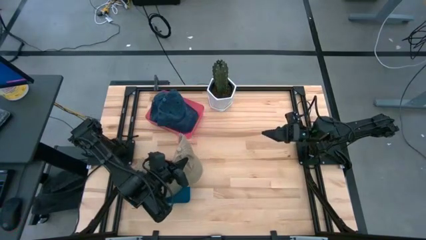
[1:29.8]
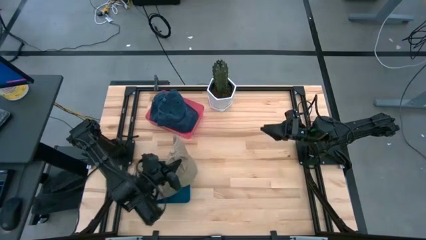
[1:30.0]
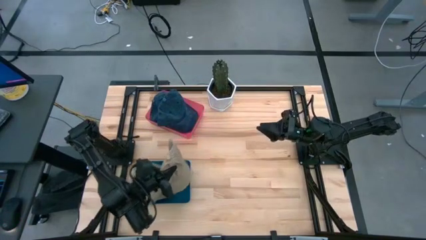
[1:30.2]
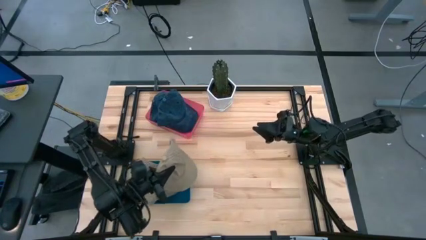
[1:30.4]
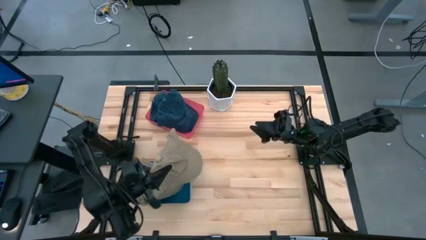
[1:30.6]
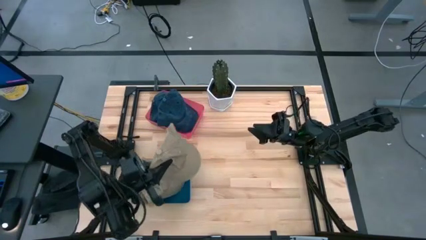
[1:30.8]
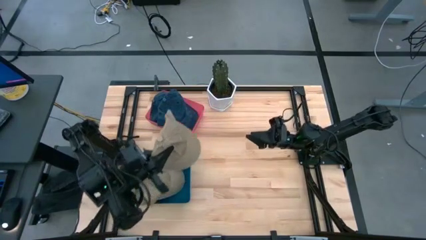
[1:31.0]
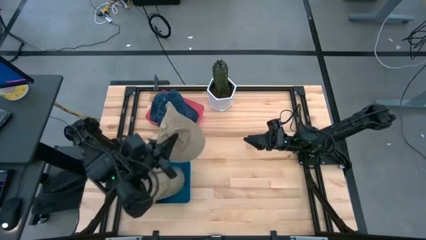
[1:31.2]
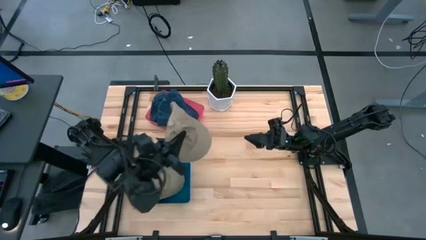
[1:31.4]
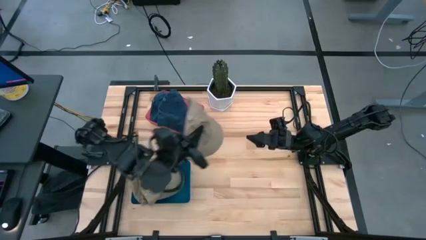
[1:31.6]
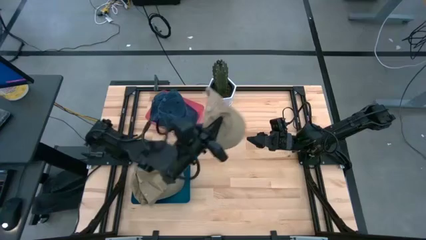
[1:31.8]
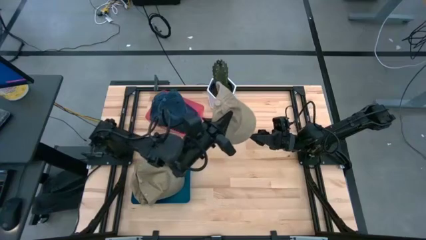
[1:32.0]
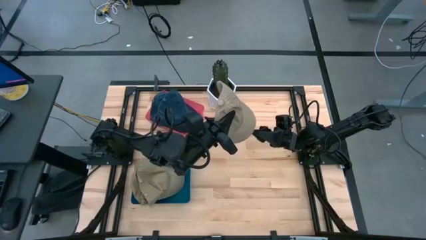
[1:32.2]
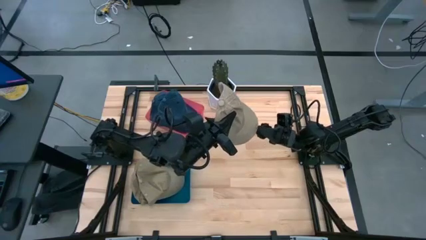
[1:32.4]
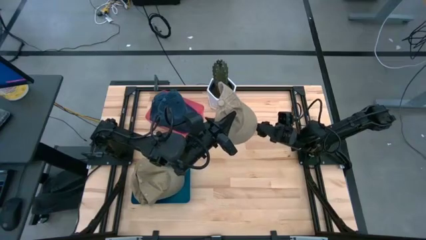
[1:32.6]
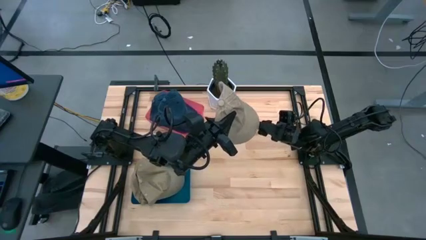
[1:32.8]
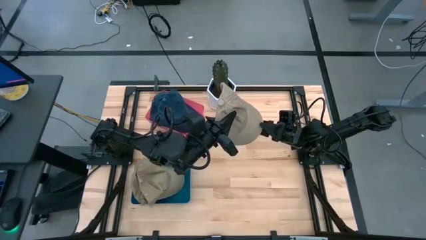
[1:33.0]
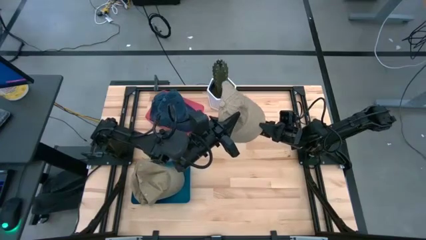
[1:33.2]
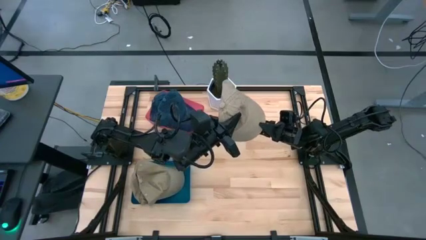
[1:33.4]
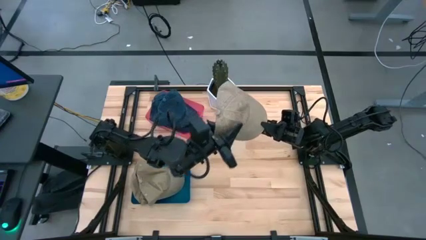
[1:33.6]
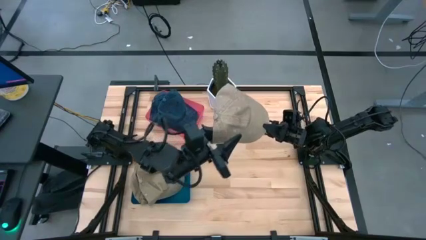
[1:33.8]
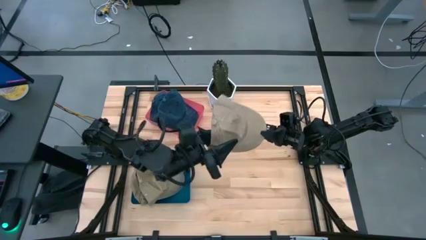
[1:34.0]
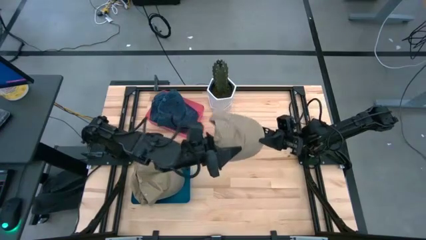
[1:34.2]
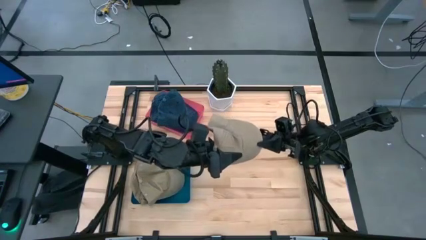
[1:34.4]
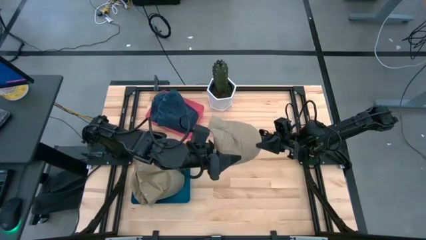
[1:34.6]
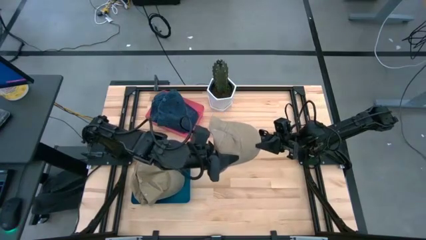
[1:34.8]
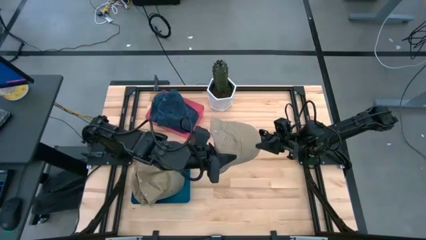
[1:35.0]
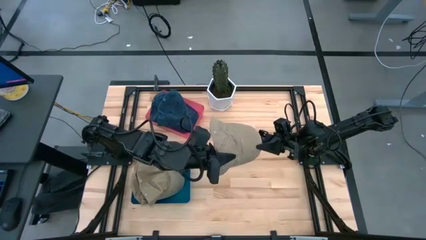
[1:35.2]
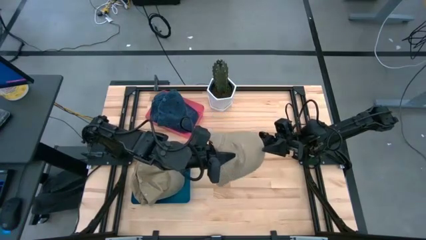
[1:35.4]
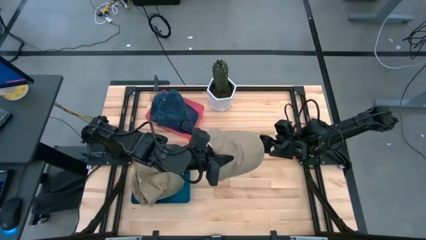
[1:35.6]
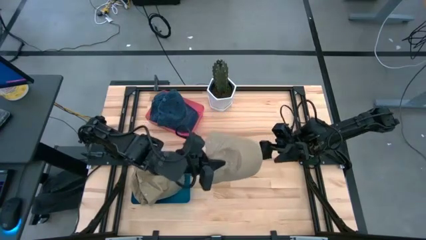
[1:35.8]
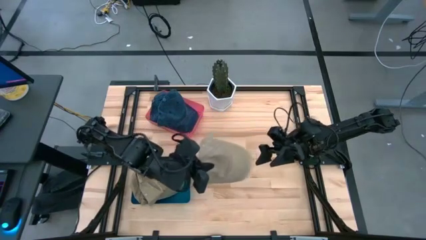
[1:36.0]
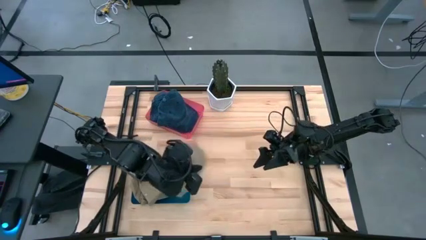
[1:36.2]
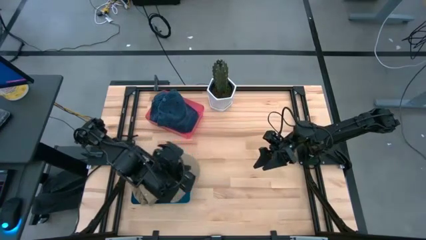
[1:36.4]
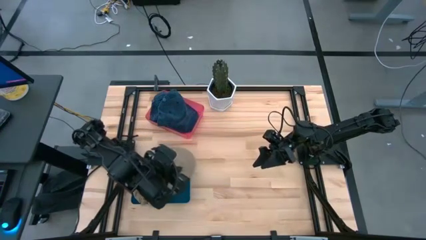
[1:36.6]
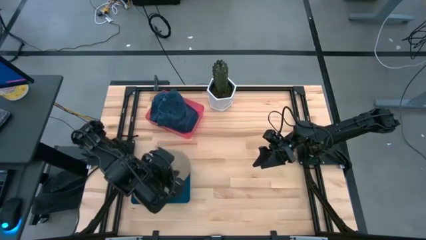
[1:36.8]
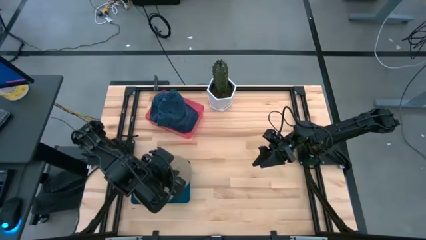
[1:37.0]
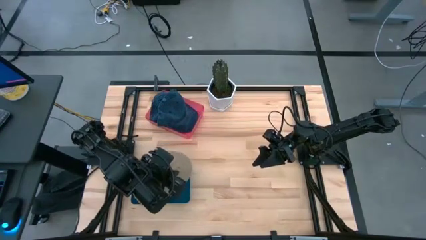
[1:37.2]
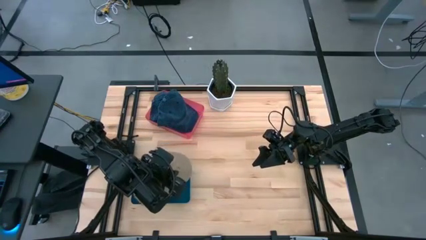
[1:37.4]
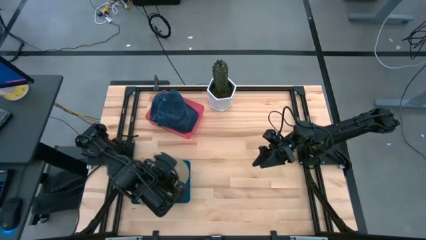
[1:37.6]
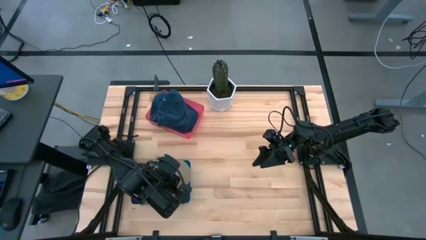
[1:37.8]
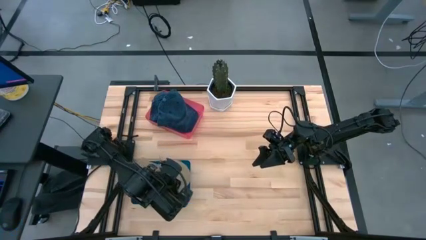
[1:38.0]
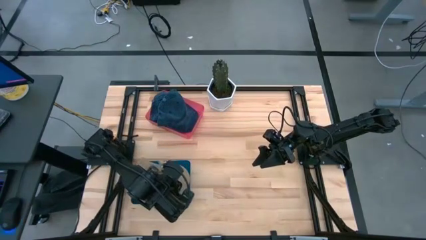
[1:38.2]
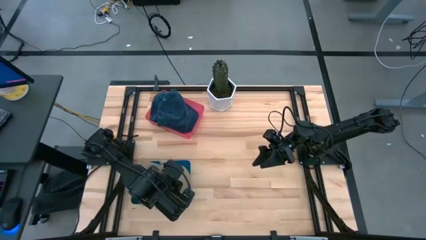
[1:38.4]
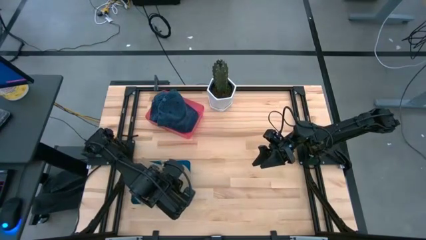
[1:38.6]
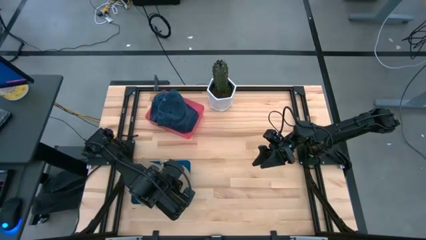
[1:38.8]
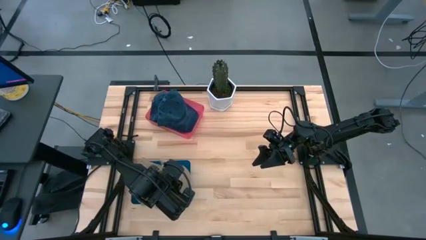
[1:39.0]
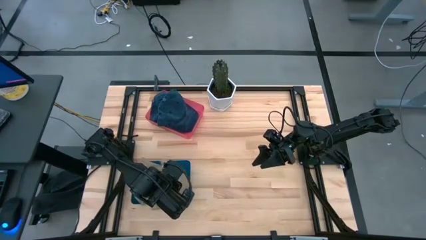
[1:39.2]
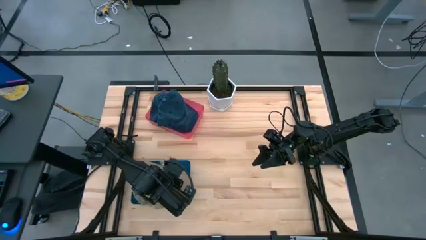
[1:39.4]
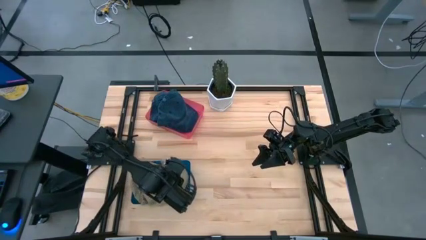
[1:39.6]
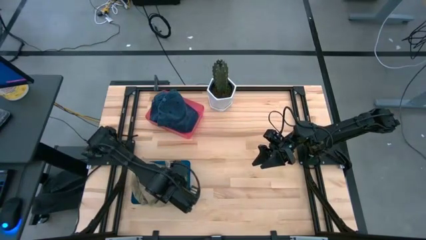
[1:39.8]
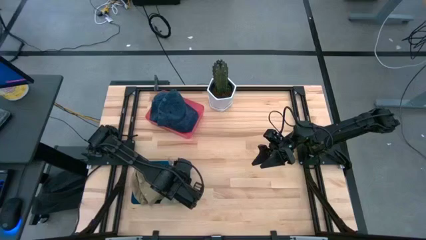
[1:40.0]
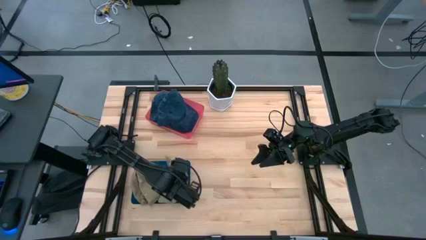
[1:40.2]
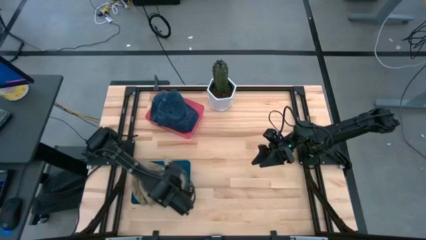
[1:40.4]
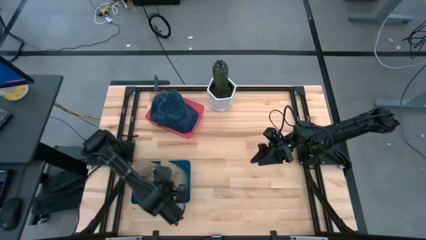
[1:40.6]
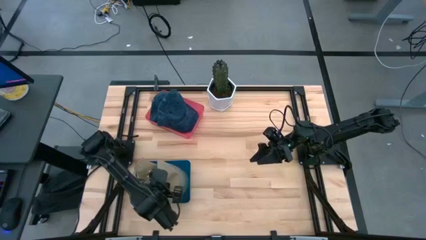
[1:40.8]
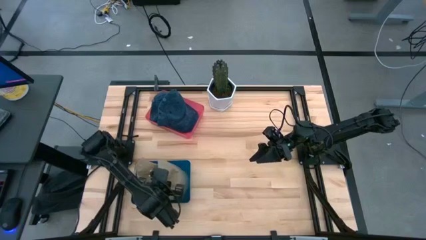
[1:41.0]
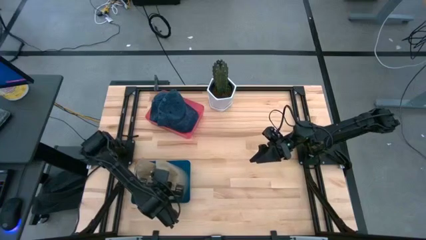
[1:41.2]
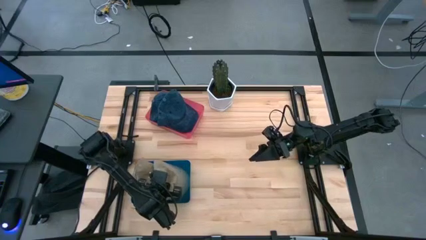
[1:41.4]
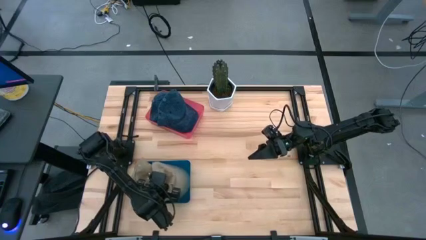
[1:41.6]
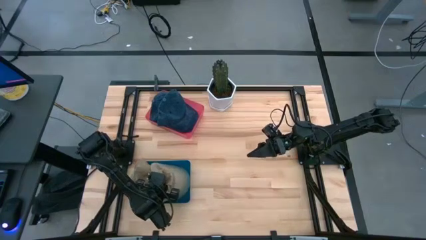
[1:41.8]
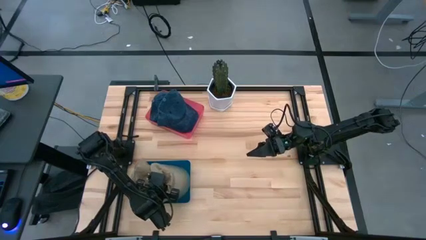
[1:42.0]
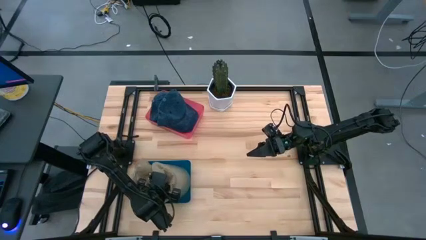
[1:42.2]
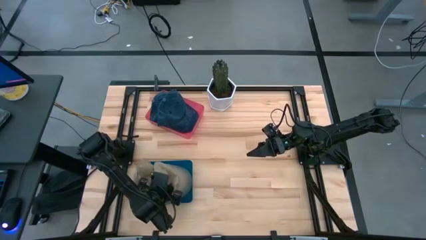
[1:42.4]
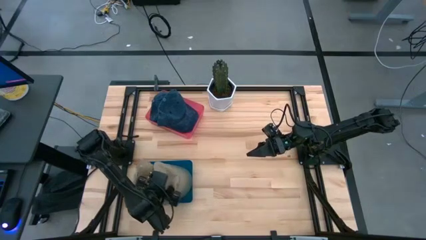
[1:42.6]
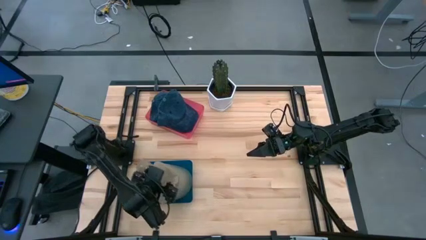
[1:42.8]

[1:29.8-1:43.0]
Task: Pick & Place hat
Put the brown cap into the blue bin

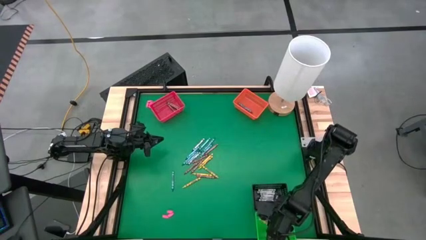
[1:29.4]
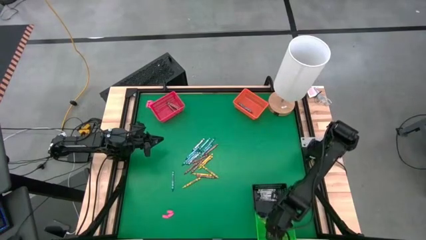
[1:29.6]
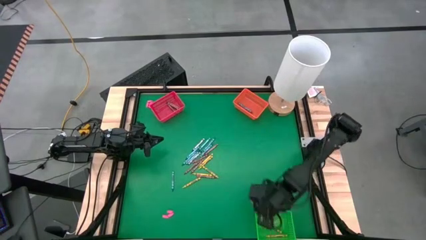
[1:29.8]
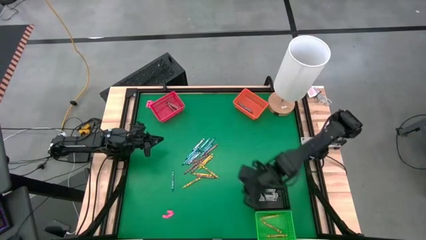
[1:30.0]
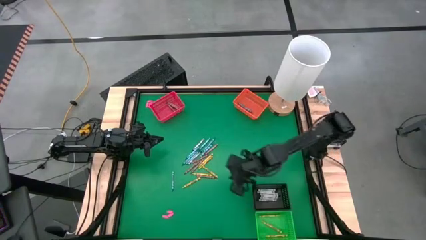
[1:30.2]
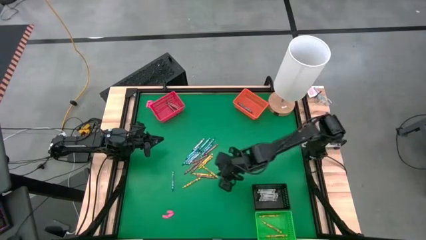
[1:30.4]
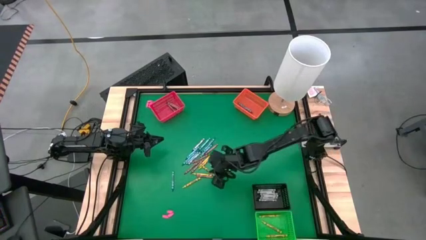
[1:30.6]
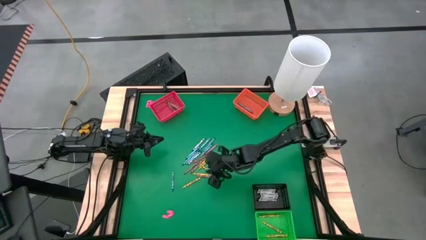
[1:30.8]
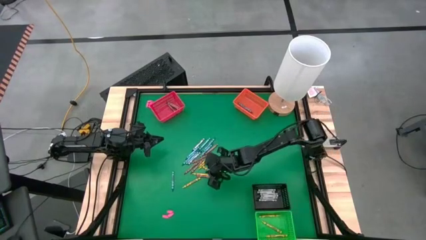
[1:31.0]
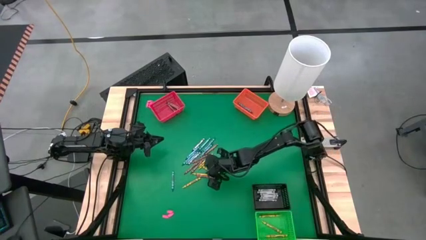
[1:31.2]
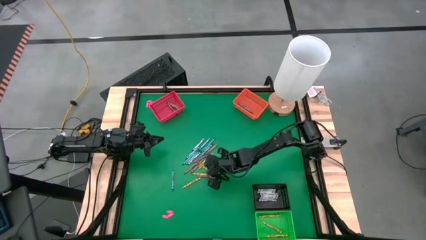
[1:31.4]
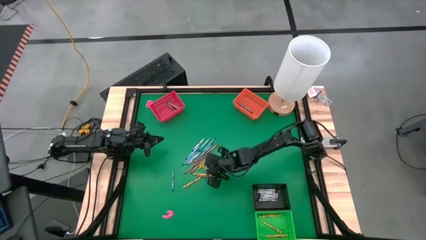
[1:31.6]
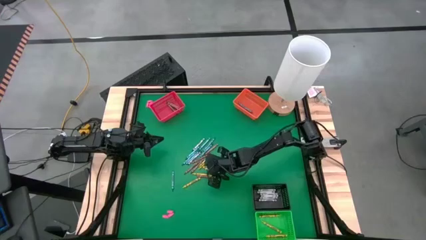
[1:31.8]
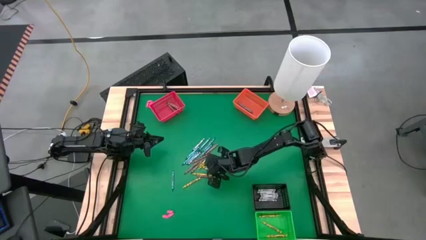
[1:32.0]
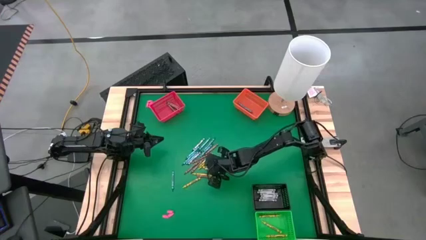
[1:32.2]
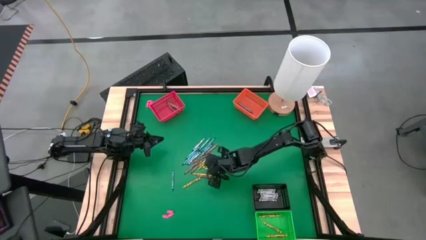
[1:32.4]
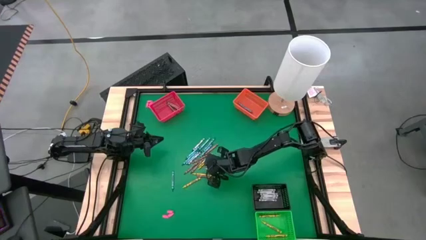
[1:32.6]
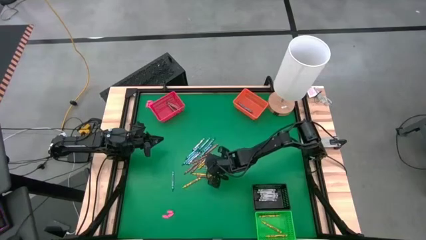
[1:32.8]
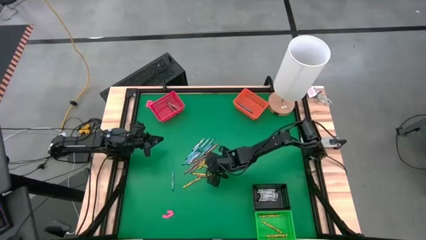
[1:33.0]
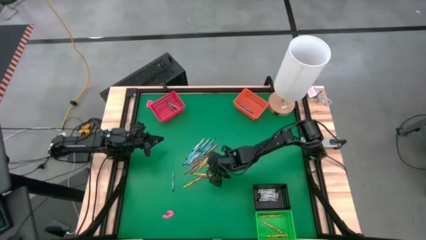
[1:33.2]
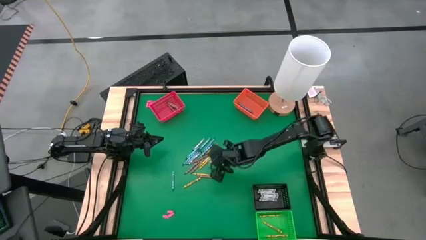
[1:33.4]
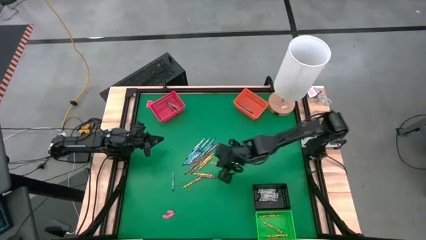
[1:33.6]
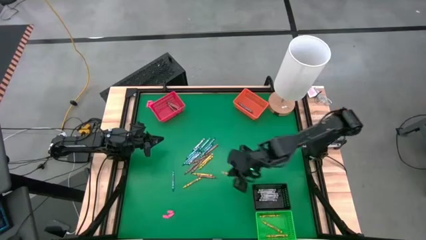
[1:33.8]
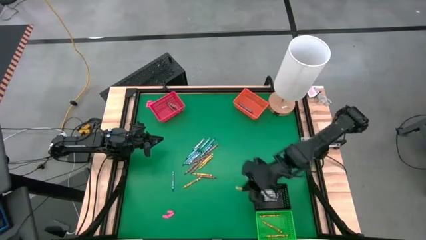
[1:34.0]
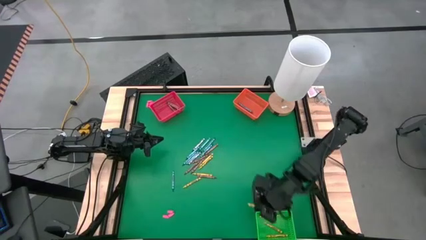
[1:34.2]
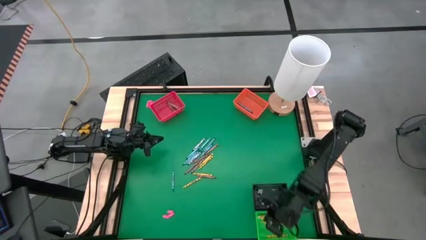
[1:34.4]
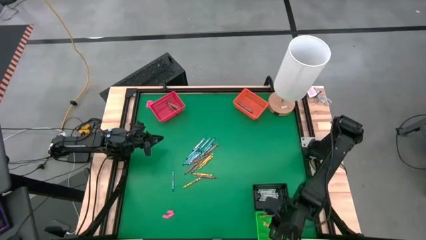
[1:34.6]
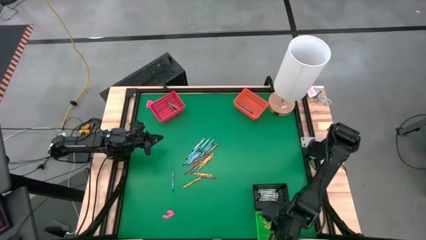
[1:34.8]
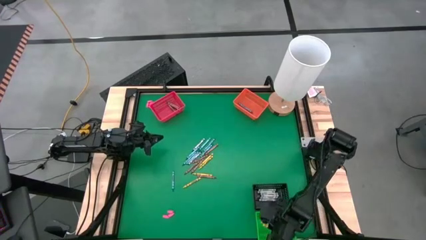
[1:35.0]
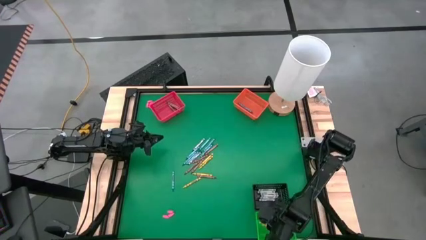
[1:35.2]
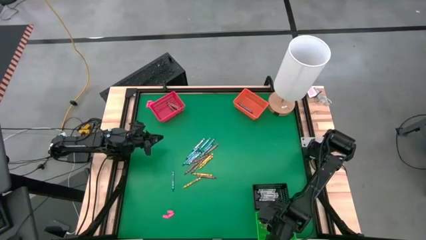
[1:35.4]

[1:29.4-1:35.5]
Task: Sort crayons
Put the yellow crayon into the green bin
